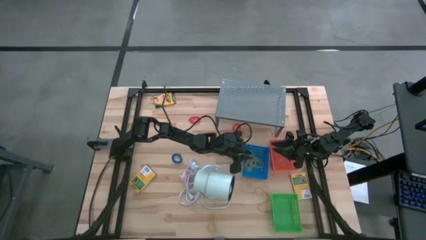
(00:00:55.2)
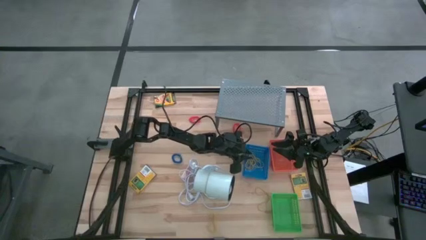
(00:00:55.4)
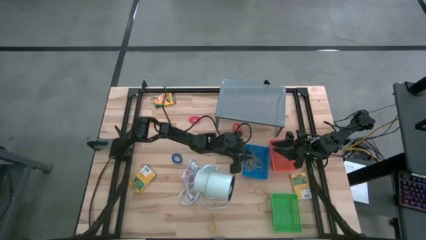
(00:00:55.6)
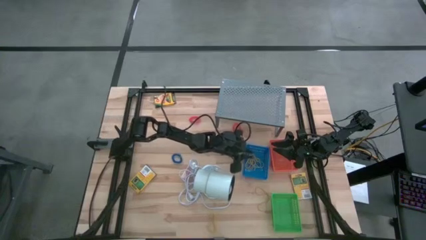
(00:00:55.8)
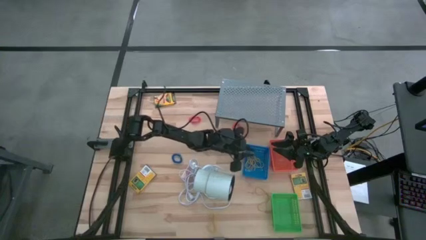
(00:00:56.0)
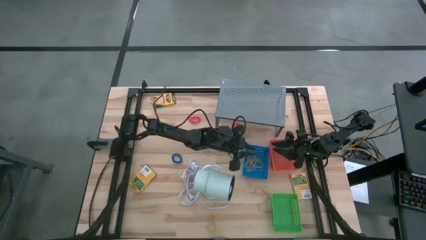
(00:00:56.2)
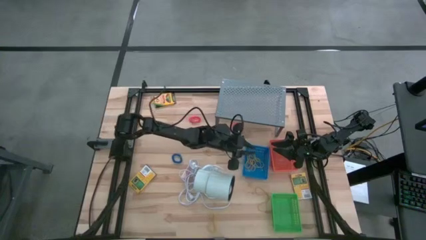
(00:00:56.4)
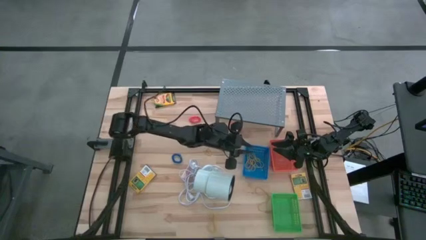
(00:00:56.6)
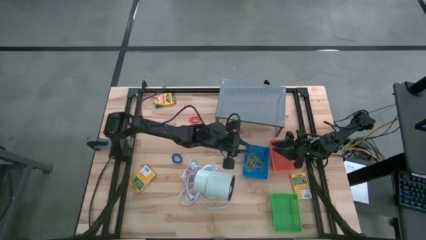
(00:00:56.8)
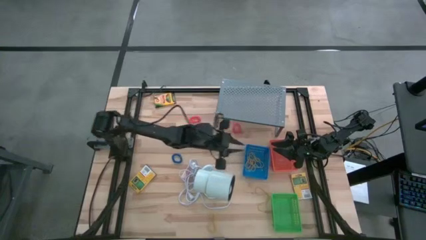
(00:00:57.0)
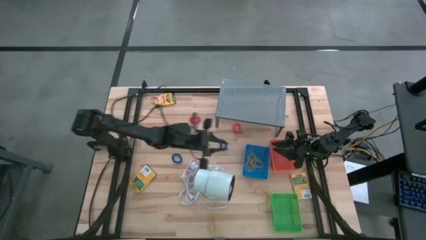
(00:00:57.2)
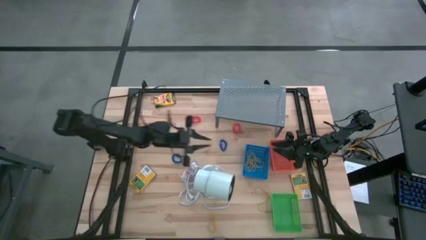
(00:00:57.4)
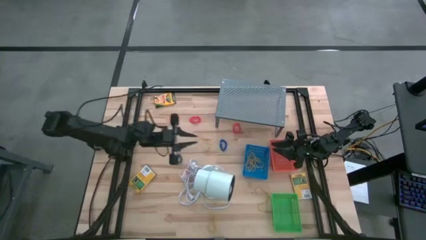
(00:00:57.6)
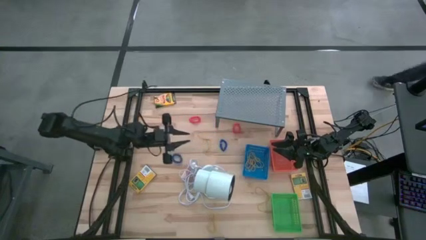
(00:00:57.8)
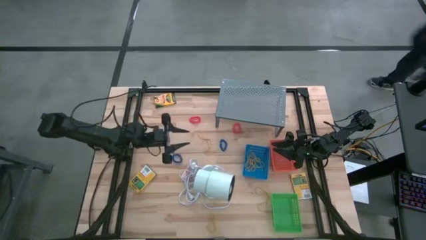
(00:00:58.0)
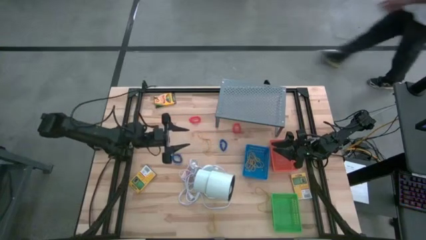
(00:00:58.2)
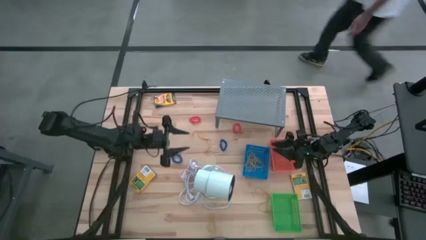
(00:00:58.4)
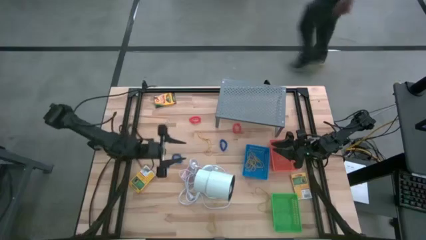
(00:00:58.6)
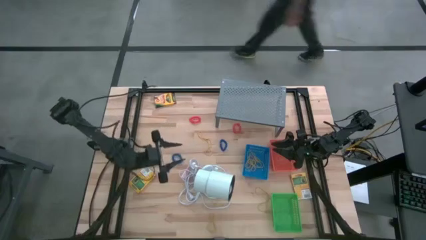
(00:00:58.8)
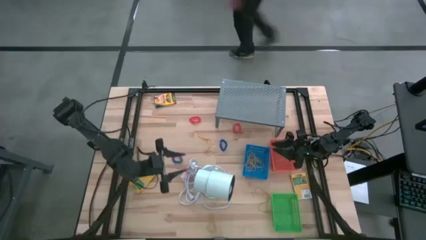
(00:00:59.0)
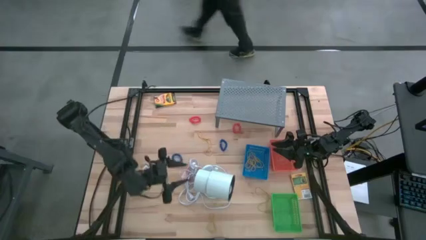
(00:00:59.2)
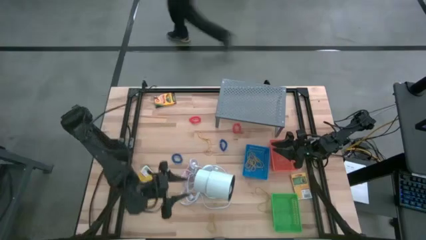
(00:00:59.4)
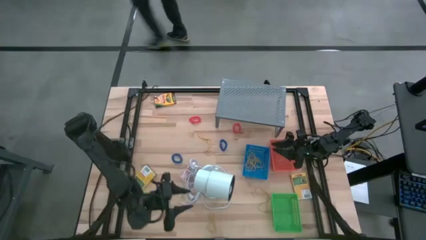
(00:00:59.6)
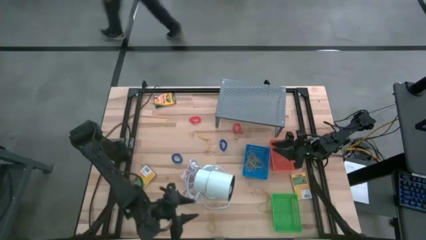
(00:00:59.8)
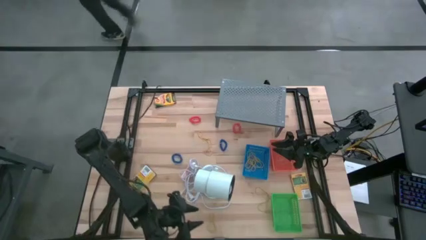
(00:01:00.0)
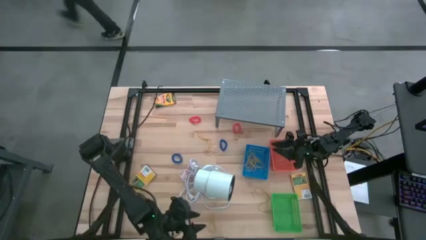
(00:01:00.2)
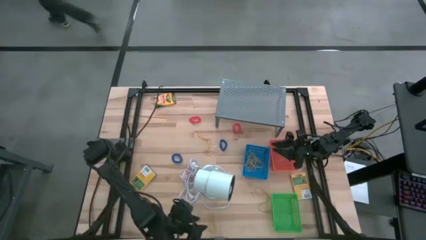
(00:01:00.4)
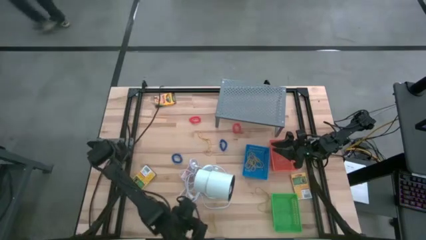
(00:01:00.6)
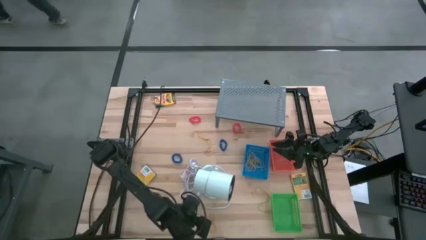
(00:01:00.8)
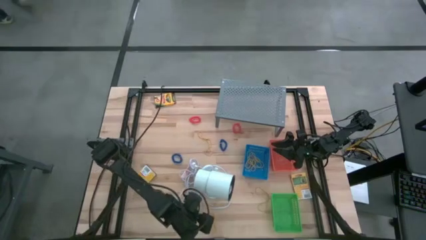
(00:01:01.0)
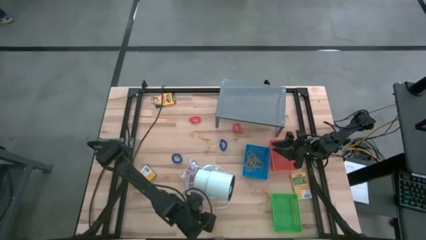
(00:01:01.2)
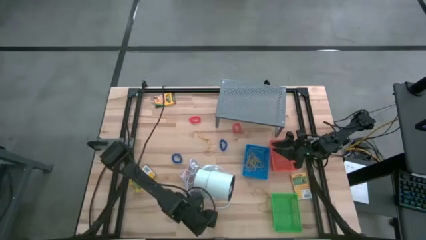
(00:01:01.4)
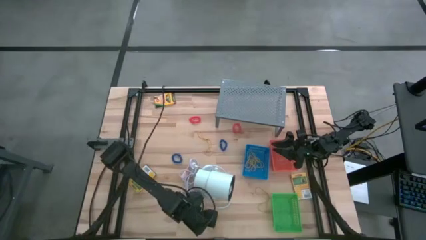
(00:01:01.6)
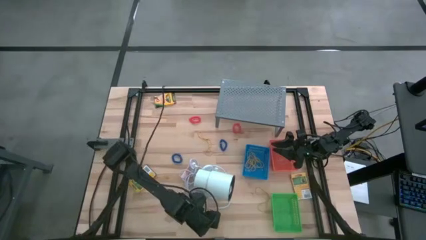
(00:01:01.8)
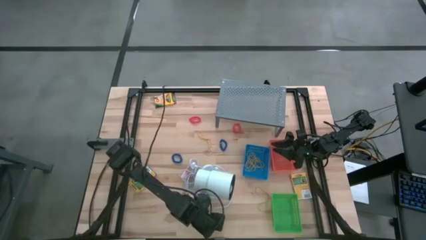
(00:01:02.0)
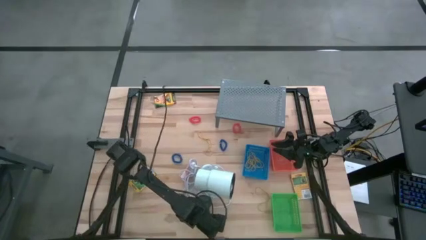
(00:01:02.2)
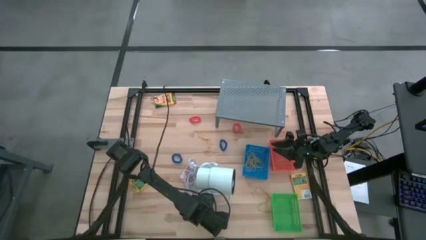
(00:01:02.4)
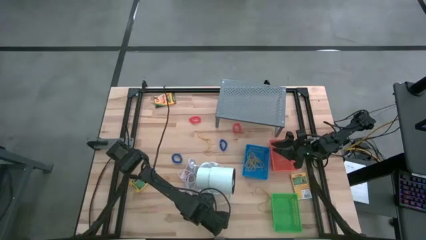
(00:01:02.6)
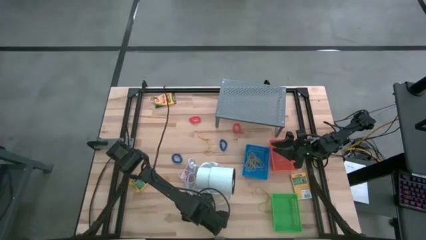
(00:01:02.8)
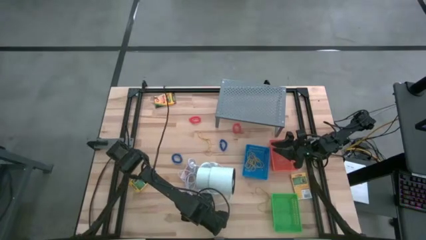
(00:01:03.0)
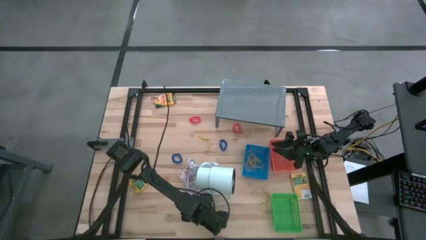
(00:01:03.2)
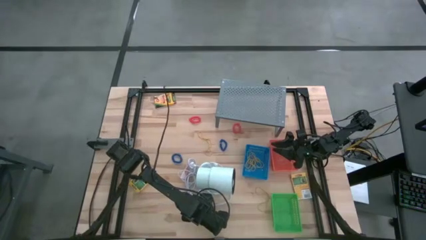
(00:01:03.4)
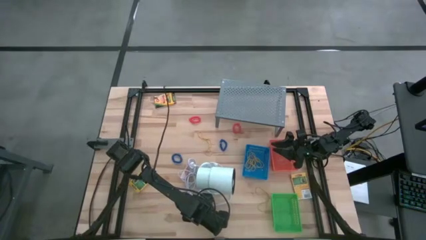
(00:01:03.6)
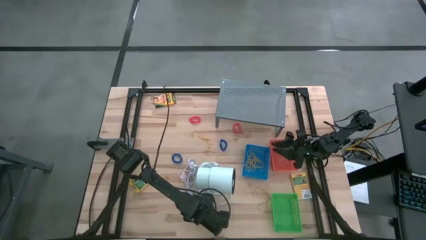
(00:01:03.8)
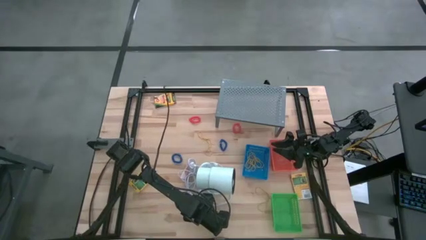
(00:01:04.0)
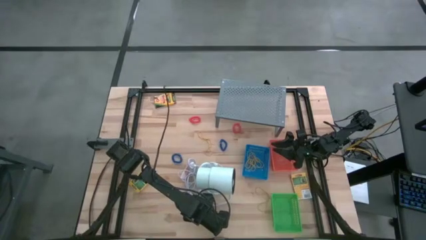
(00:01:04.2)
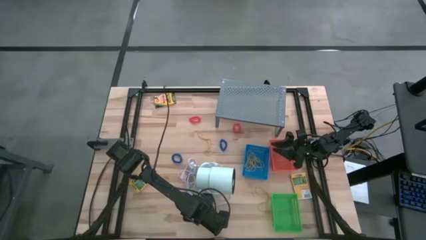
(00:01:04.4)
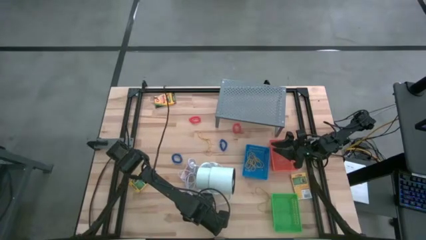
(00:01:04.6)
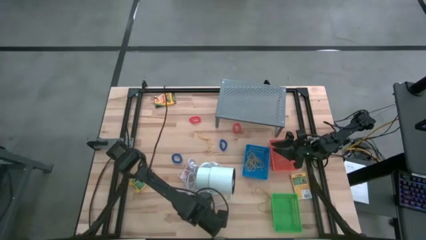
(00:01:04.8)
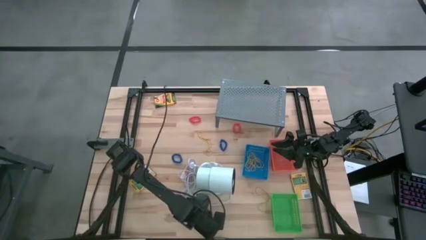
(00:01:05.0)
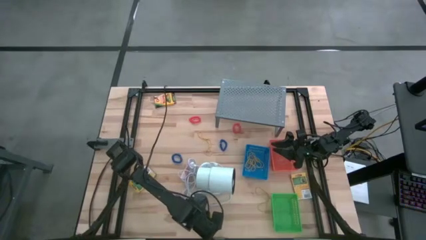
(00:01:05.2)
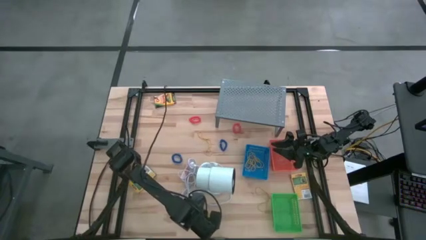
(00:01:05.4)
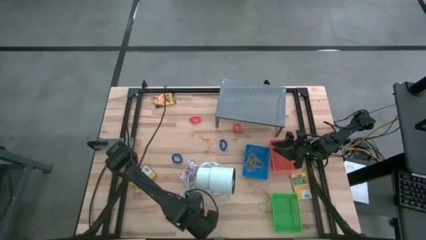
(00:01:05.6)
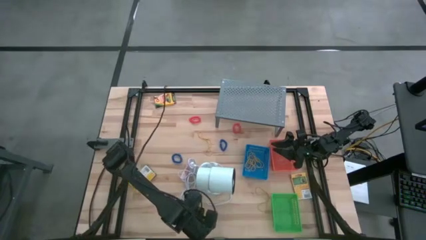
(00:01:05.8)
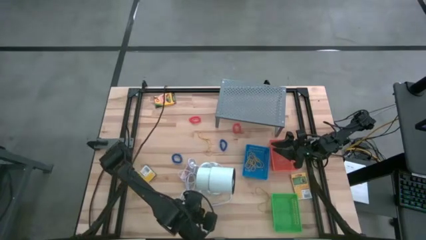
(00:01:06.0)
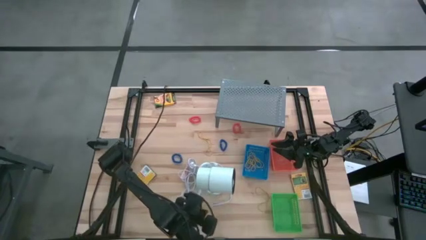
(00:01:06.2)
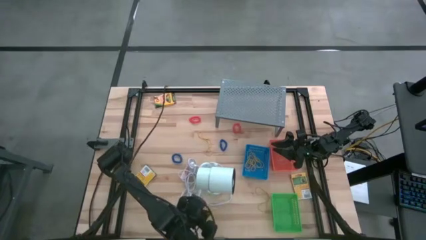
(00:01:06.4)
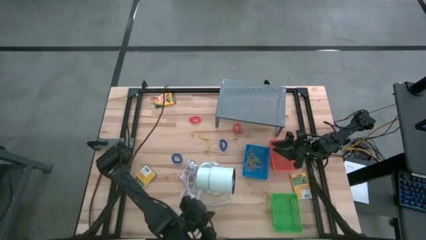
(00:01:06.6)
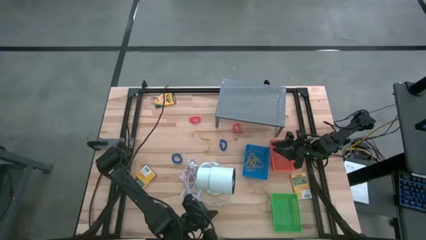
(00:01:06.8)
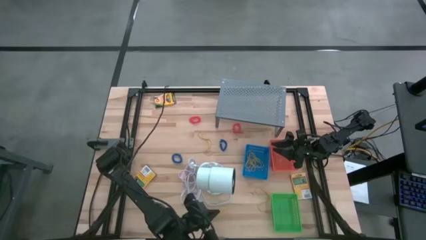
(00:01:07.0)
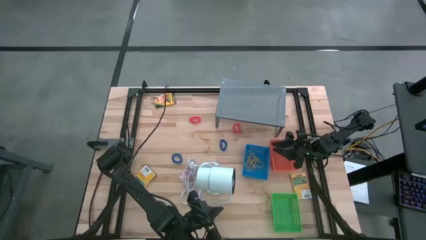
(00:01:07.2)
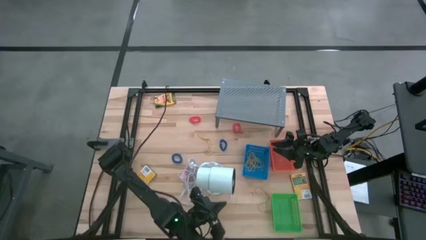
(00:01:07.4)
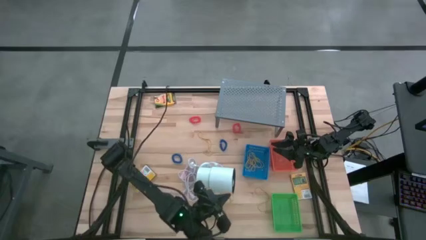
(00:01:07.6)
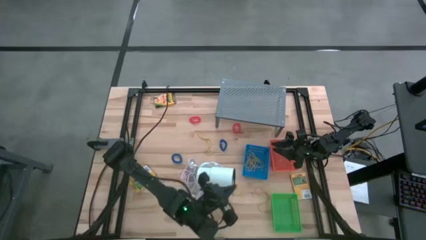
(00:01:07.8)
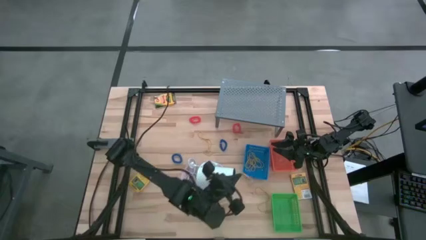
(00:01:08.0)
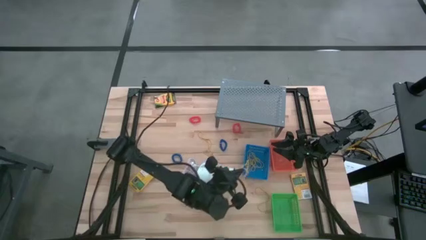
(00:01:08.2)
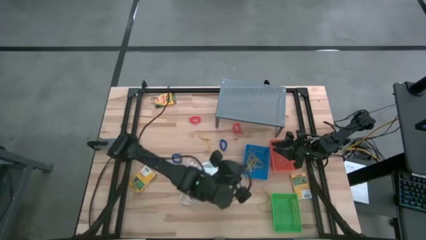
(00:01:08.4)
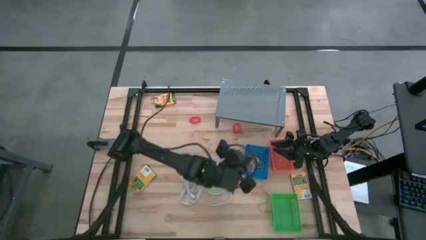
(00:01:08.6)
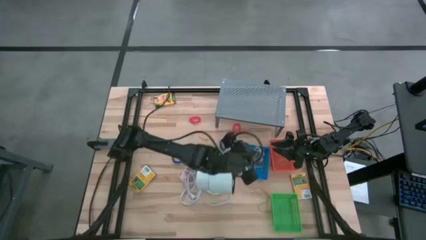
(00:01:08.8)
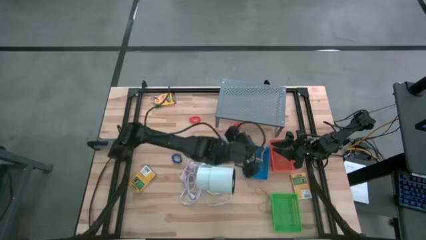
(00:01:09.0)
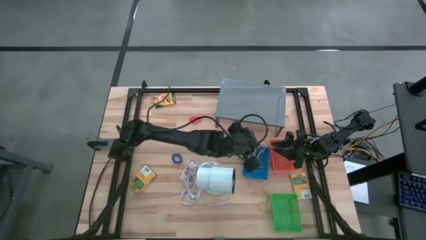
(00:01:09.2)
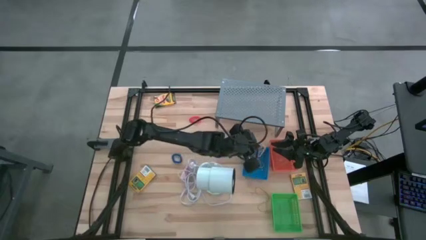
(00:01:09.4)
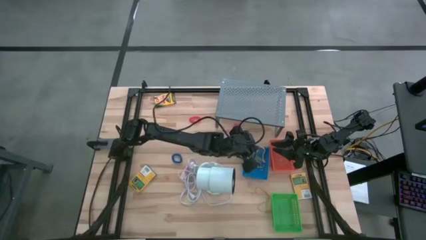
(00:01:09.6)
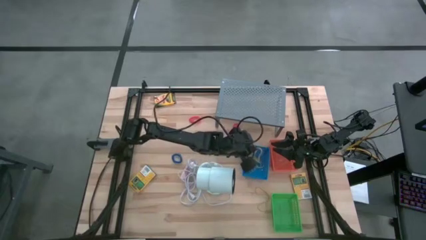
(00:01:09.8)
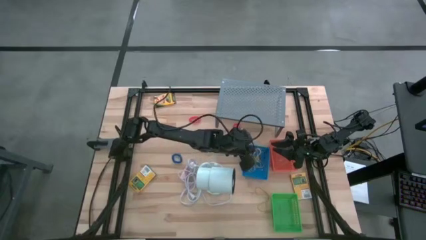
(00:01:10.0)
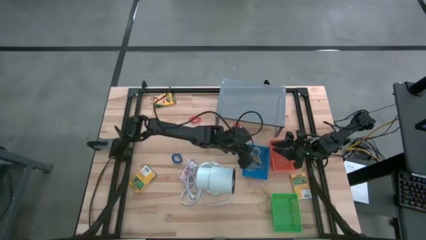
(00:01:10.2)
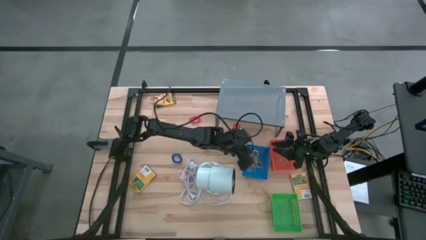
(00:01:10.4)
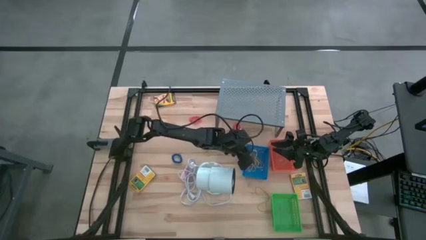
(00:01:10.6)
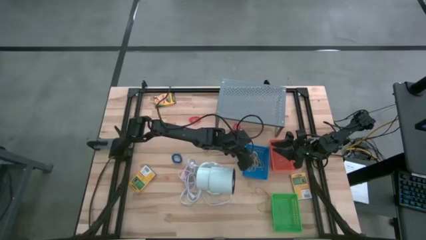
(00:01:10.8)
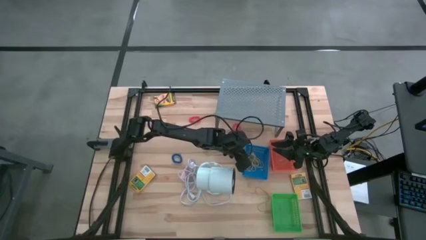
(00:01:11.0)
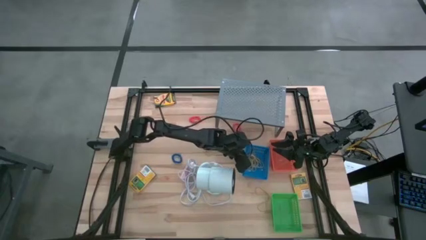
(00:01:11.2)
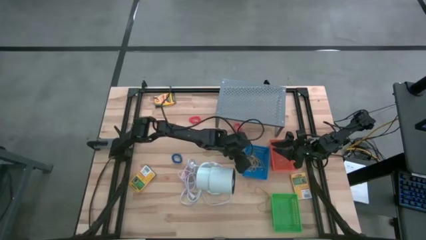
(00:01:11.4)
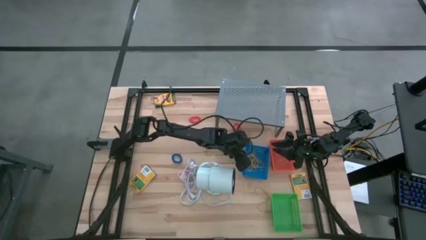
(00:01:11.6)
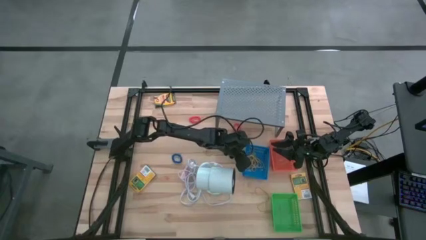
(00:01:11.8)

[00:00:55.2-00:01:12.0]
Task: Pick & Place Office Desk Supplies
Put the yellow rubber band into the blue bin
